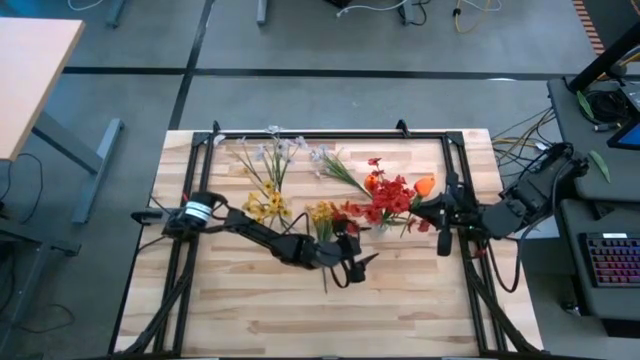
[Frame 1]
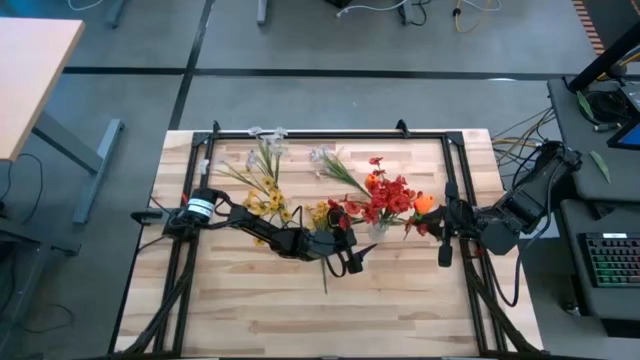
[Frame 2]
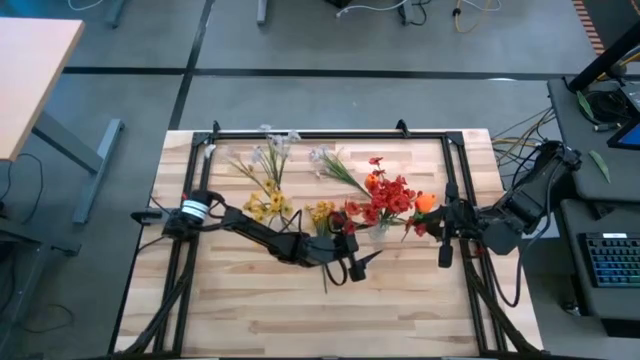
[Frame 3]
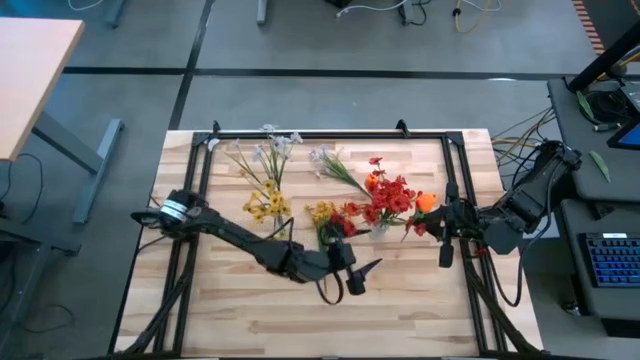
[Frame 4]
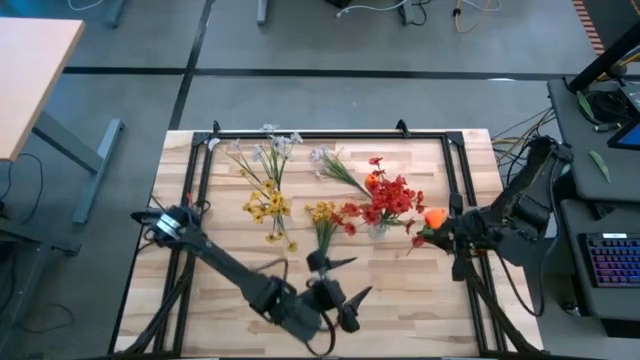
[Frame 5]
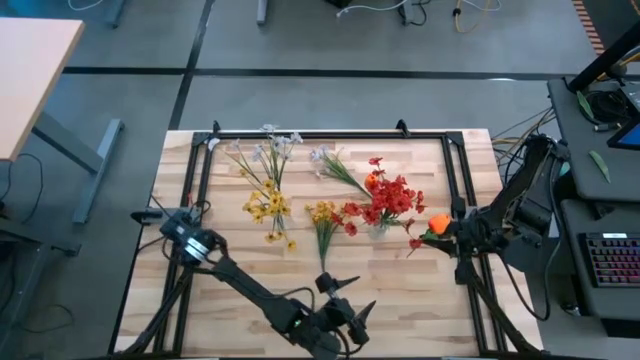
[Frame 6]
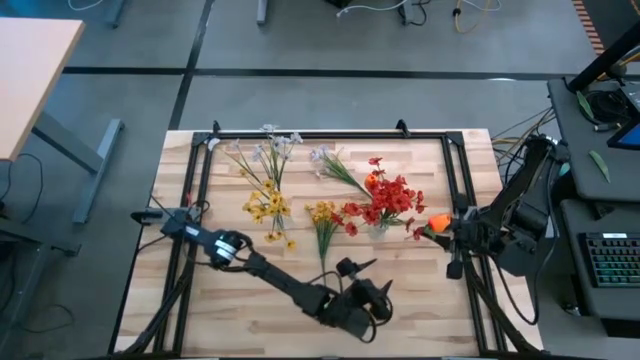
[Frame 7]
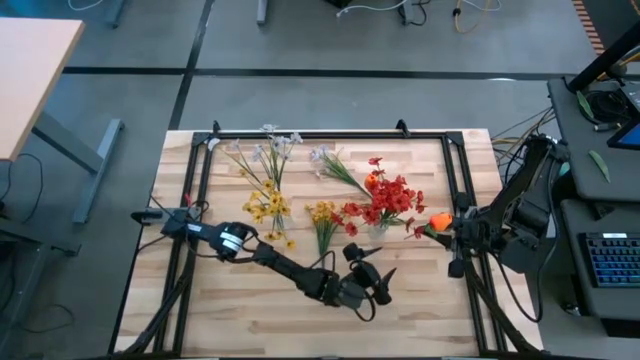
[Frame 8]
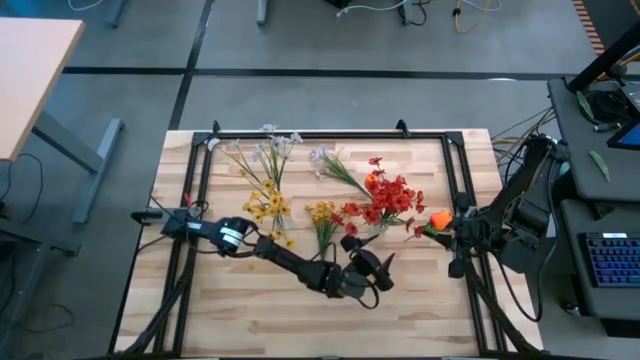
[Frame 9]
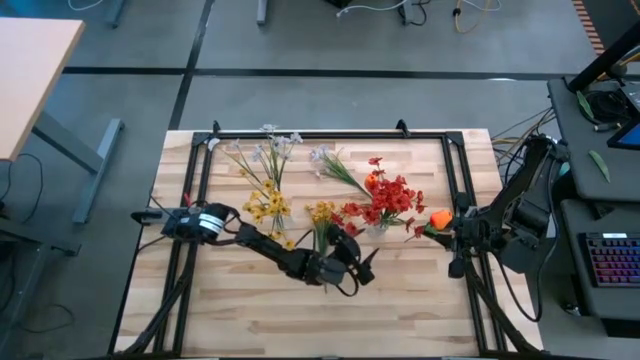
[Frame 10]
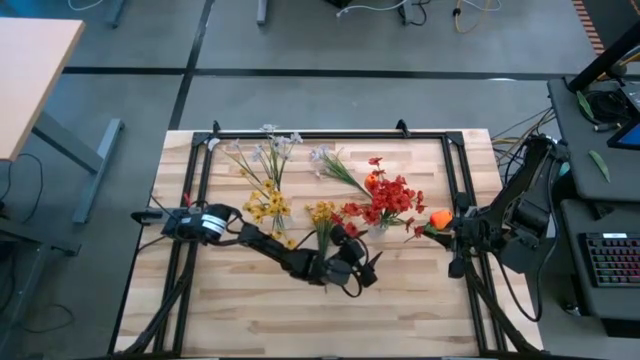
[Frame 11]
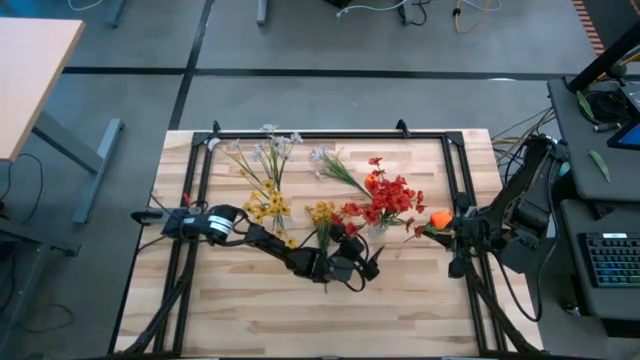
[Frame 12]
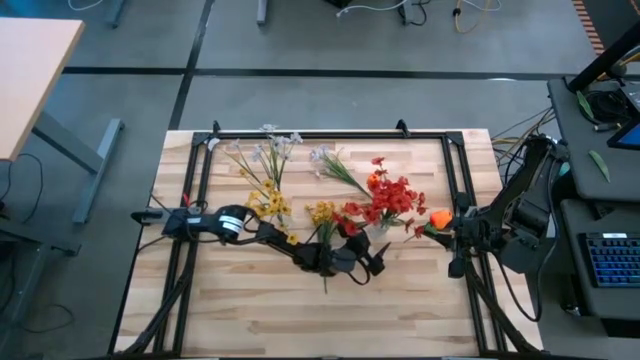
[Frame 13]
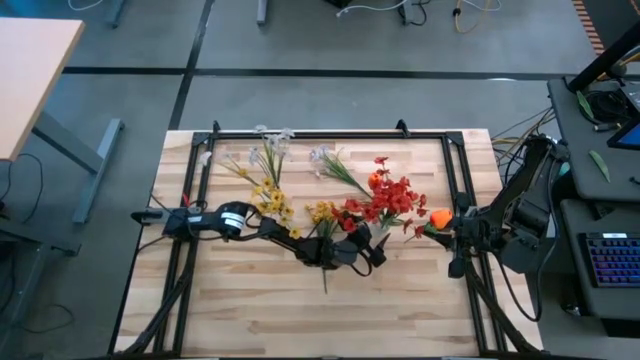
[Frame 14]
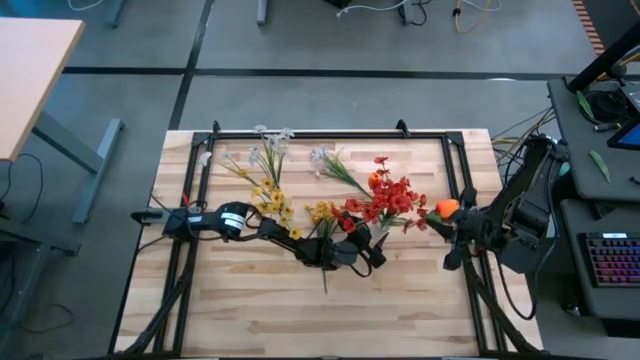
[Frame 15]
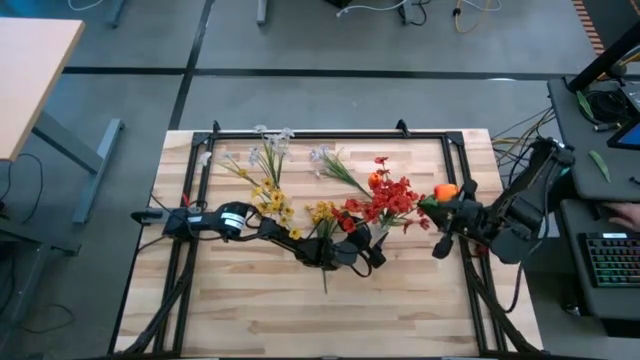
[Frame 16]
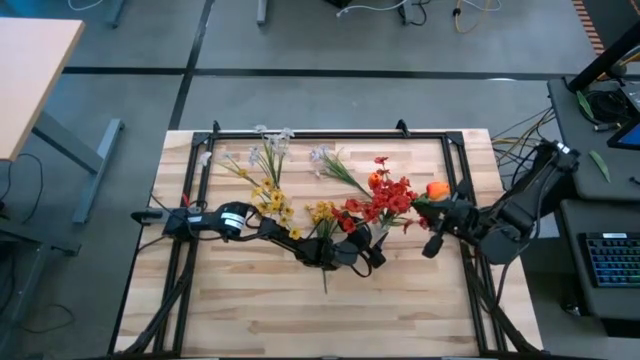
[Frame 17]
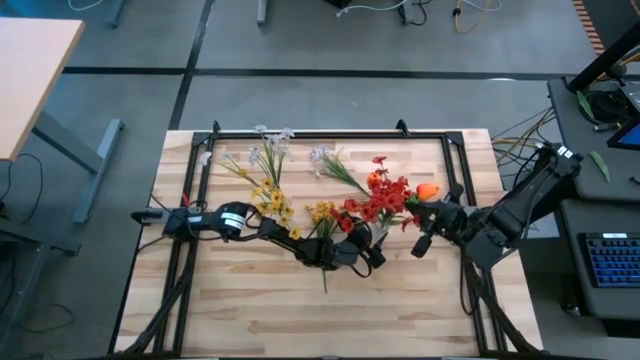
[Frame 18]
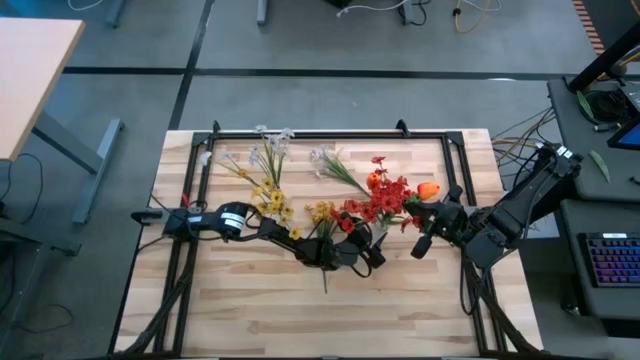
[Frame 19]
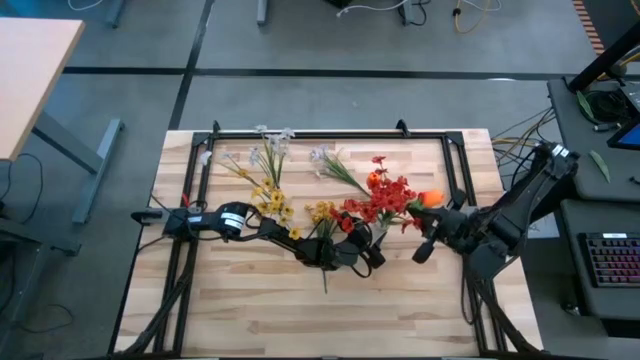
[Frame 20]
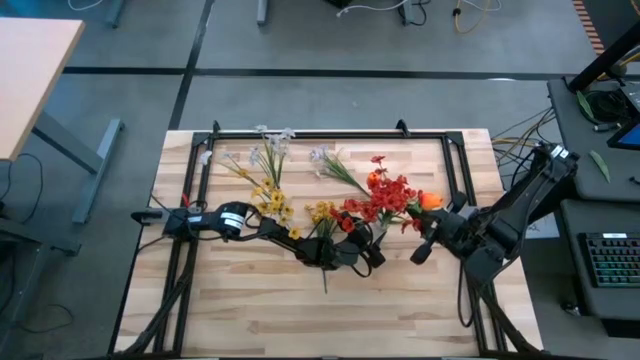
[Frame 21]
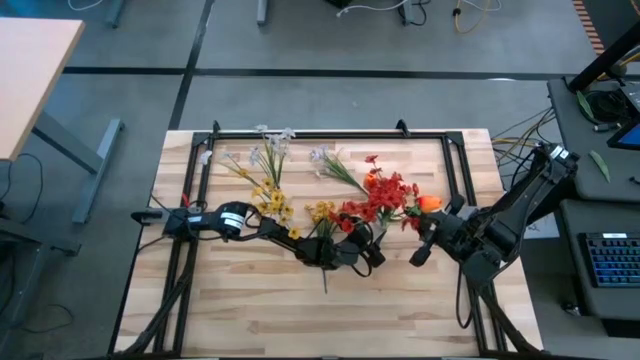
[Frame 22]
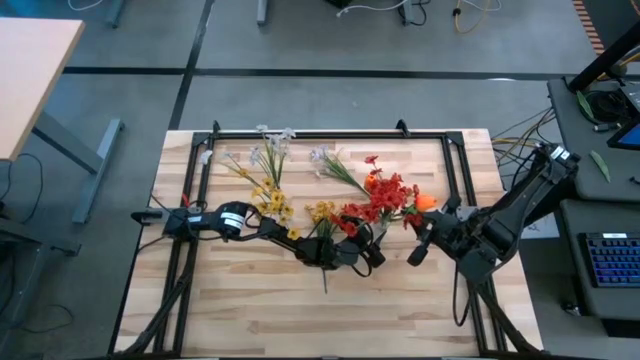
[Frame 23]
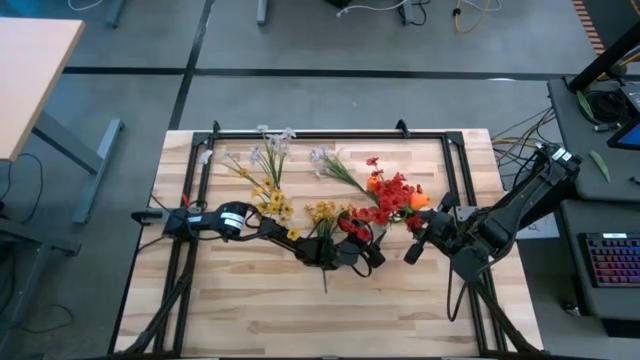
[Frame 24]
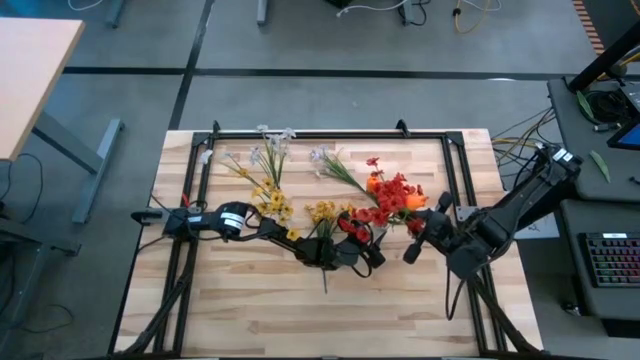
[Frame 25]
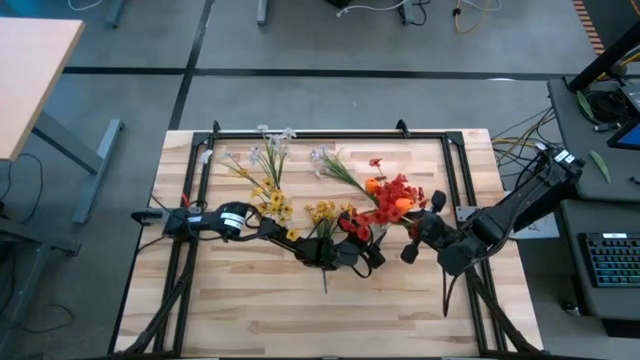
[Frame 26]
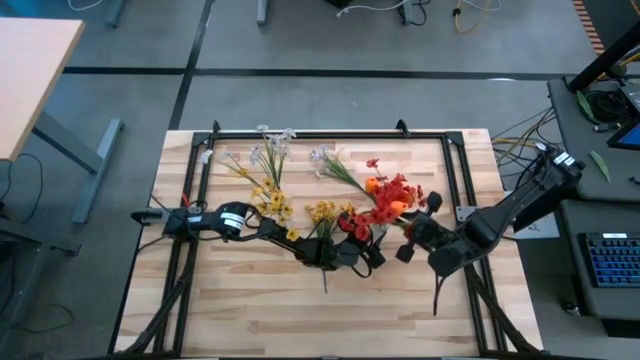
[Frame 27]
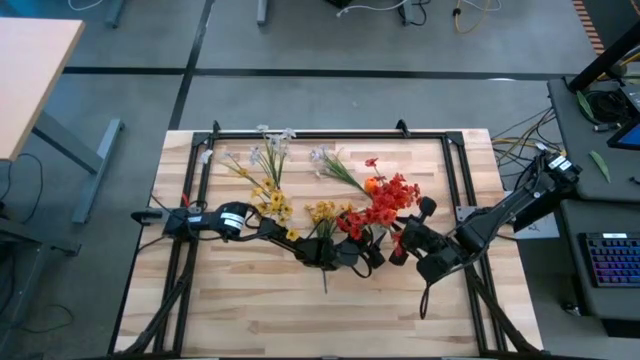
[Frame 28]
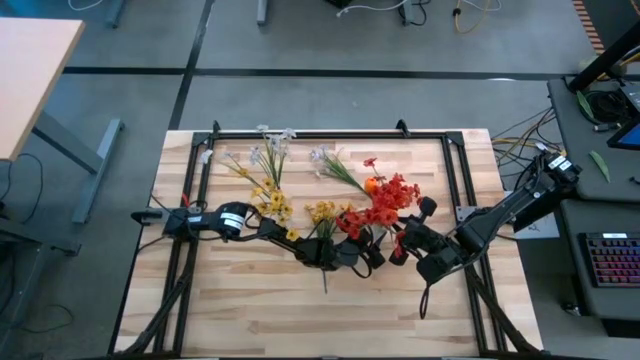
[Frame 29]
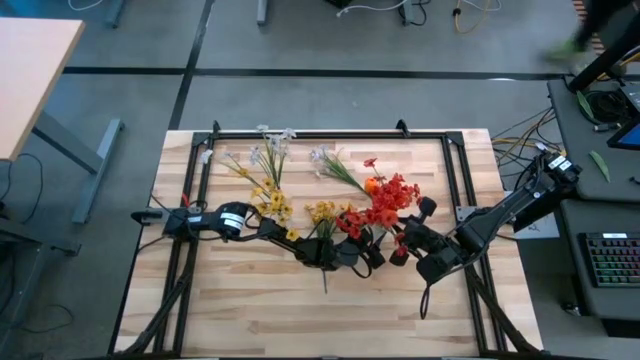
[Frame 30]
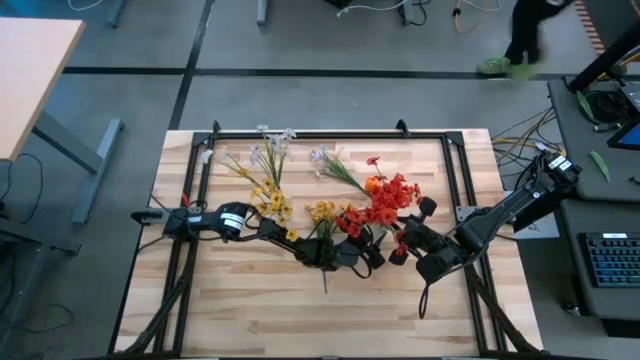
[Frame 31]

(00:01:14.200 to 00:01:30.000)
Task: Sort flowers into vase by color
Put the orange flower into the right transparent vase

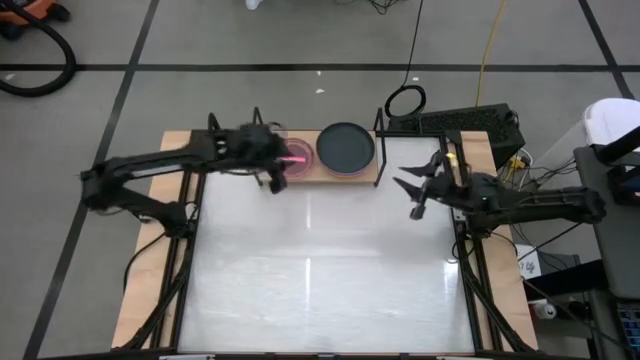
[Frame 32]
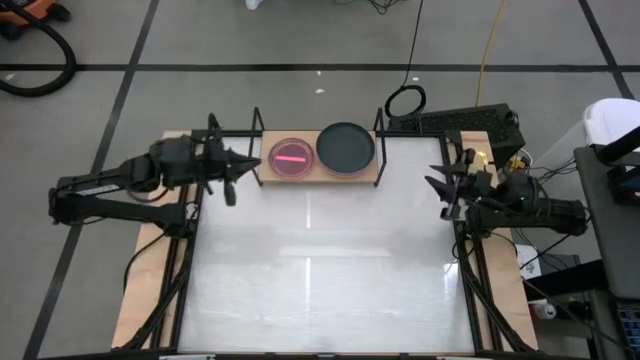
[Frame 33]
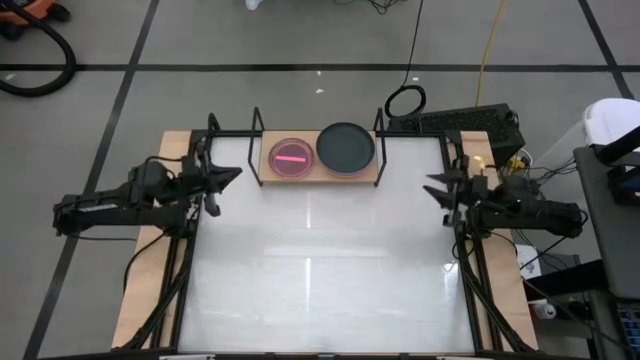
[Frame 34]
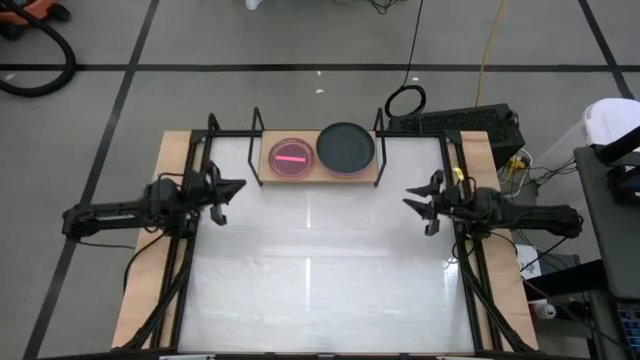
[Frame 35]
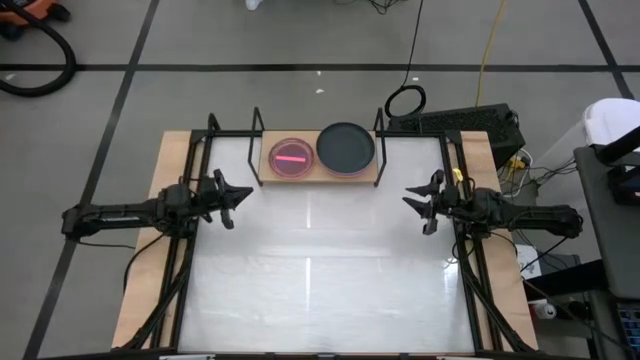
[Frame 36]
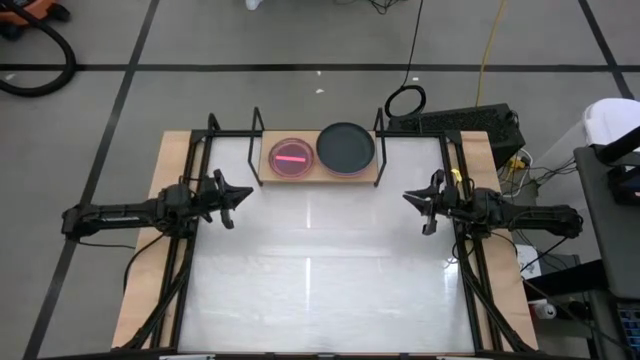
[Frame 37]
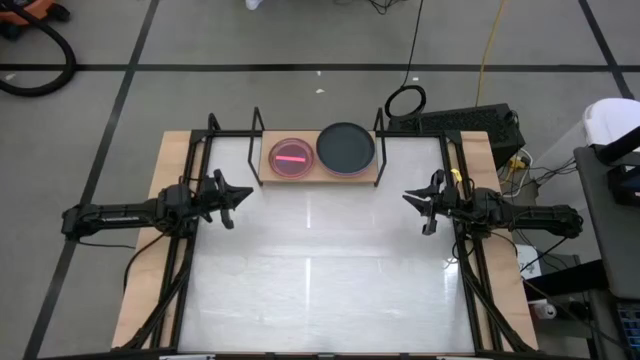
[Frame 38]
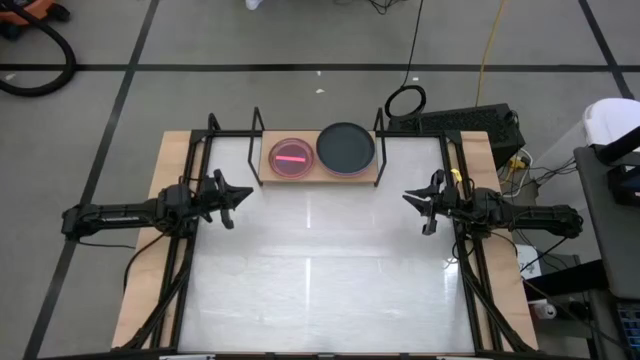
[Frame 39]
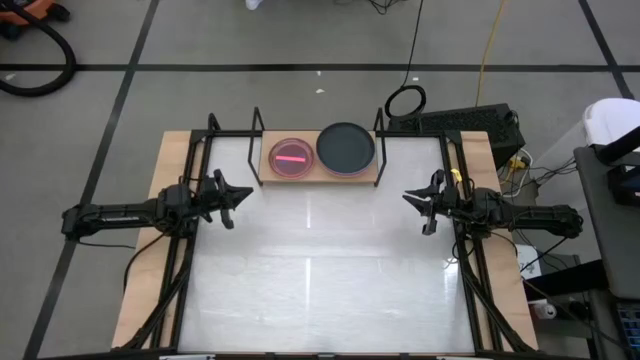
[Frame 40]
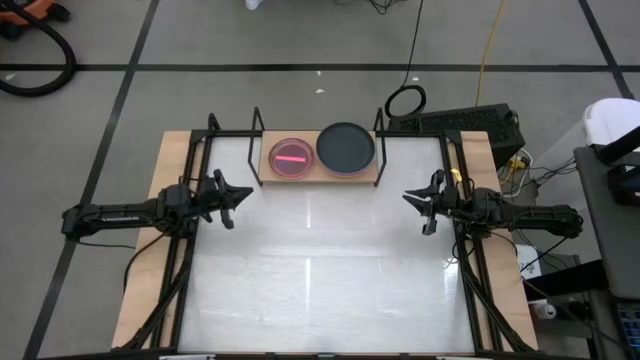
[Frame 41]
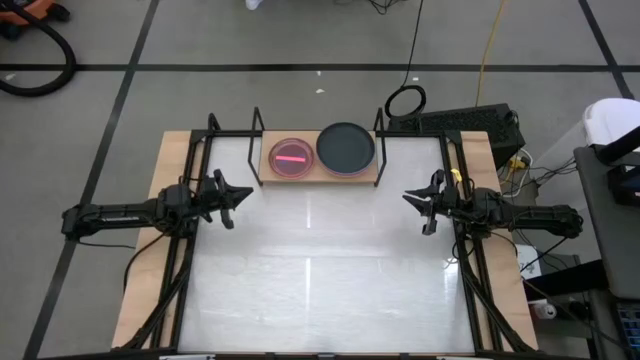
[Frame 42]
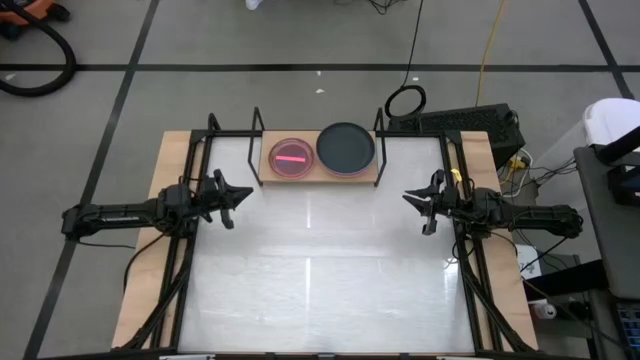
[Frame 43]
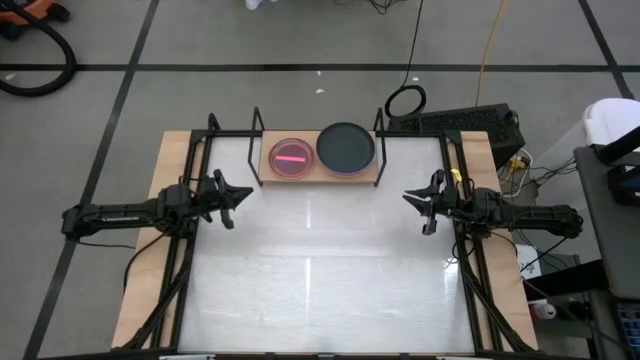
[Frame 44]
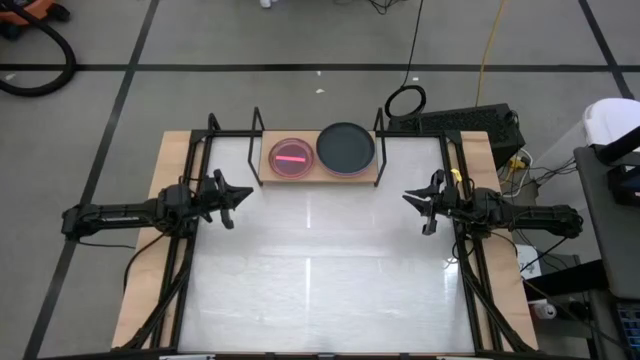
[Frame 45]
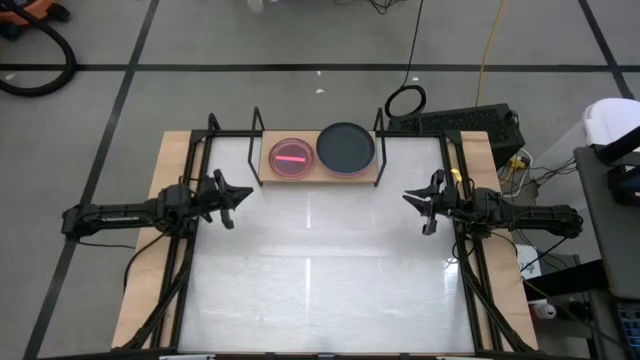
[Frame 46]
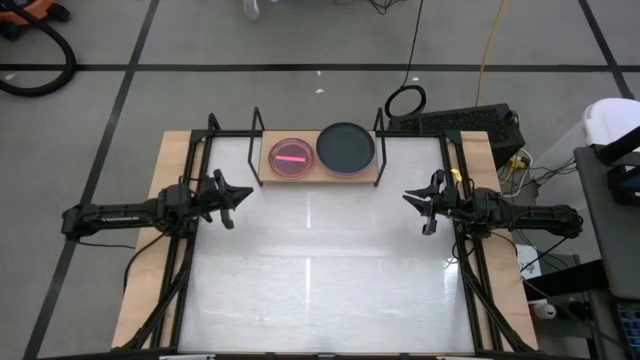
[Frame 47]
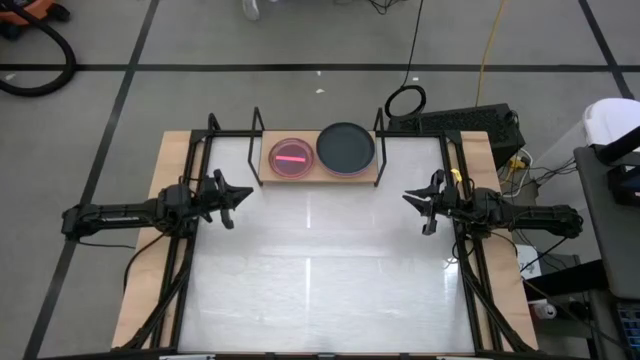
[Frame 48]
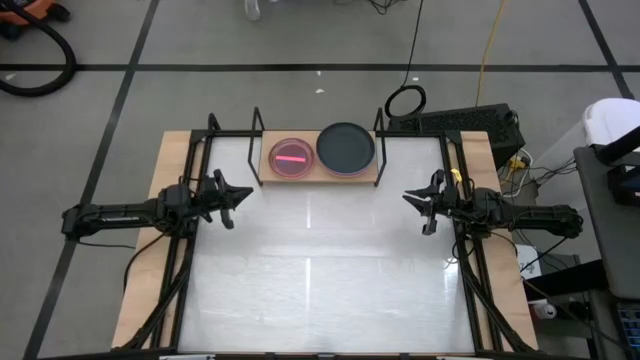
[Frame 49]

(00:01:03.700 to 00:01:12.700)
Task: Place and stack plates onto a shelf
Return to Home Position
